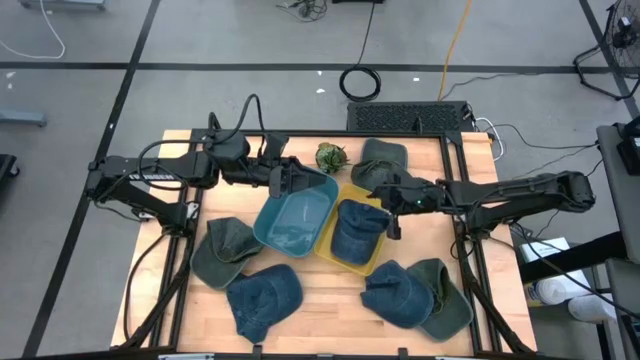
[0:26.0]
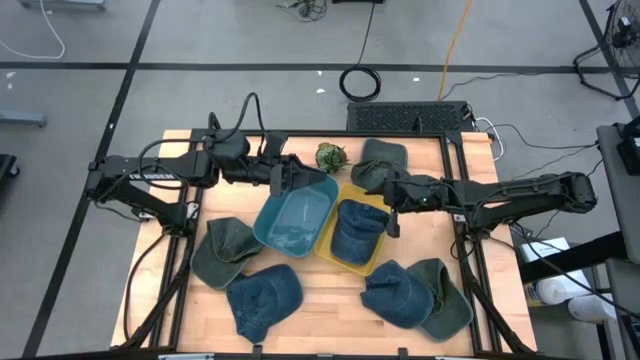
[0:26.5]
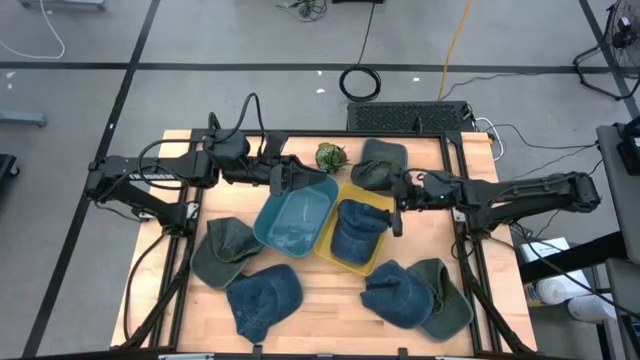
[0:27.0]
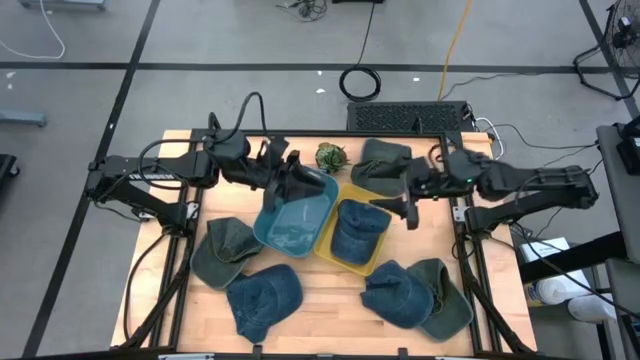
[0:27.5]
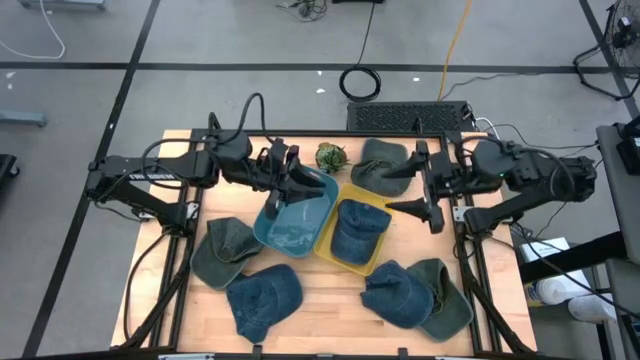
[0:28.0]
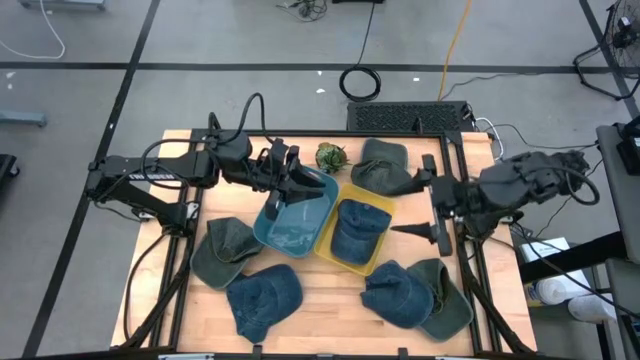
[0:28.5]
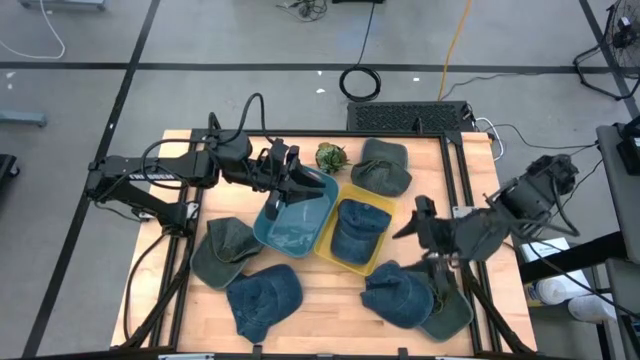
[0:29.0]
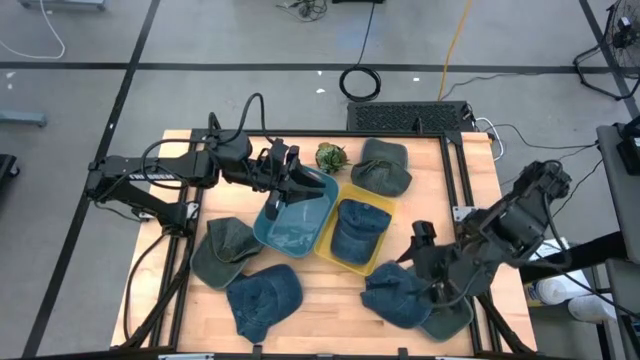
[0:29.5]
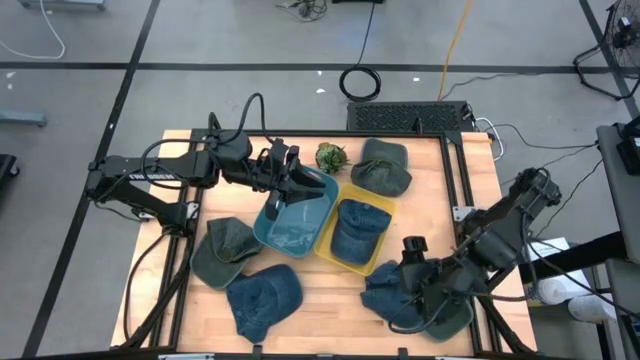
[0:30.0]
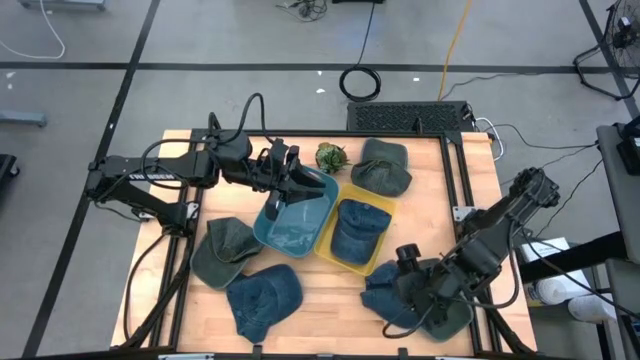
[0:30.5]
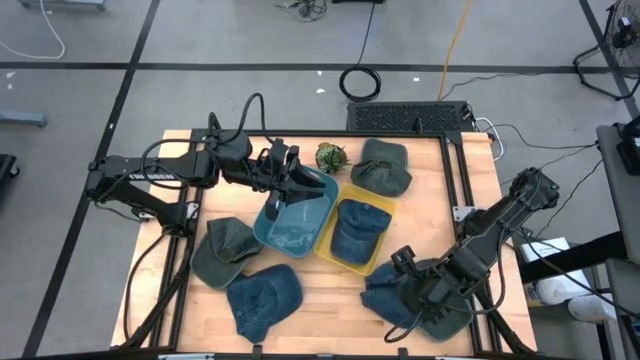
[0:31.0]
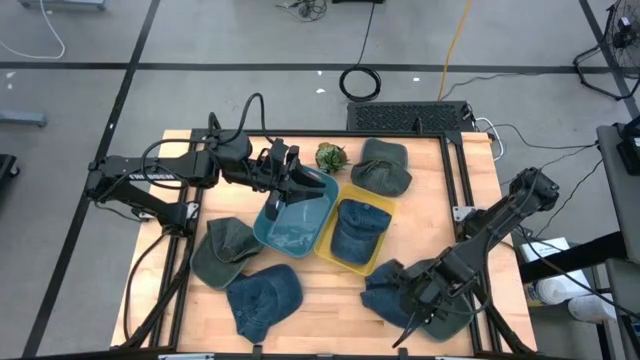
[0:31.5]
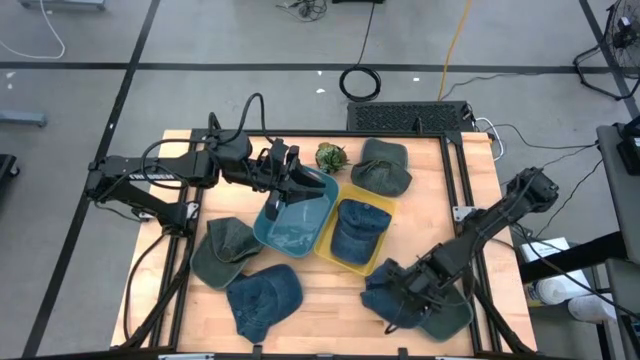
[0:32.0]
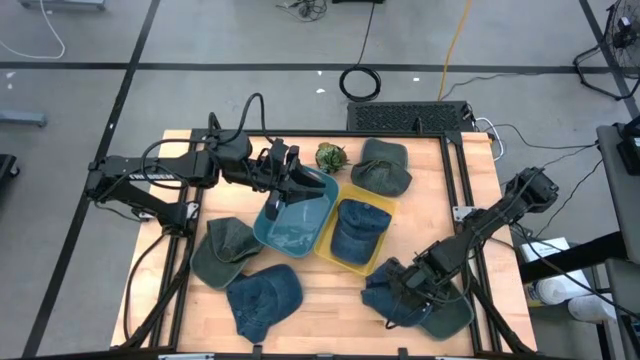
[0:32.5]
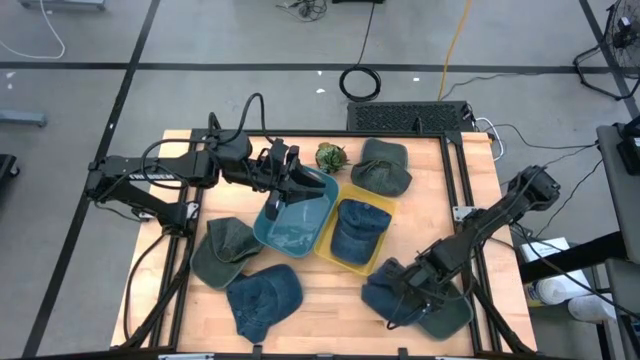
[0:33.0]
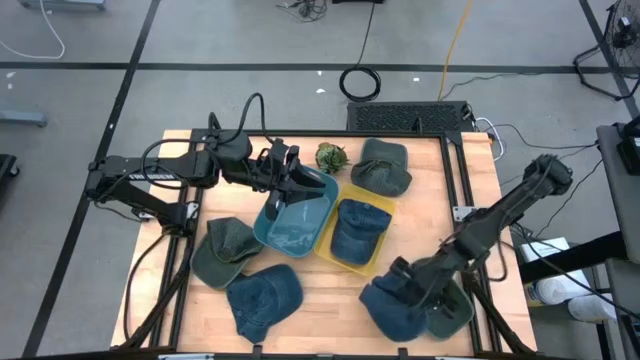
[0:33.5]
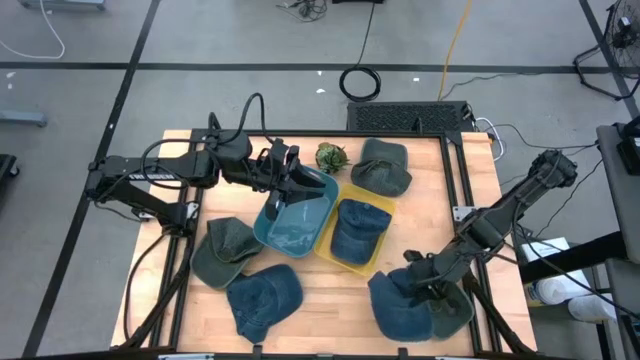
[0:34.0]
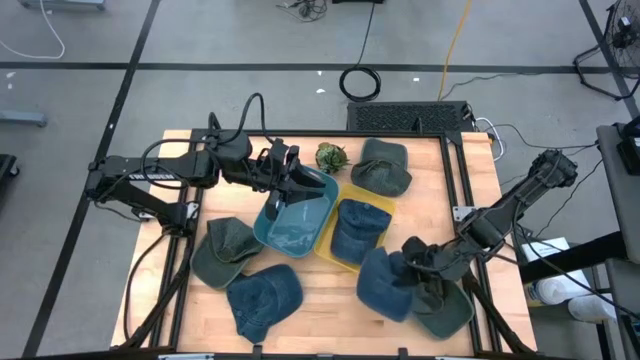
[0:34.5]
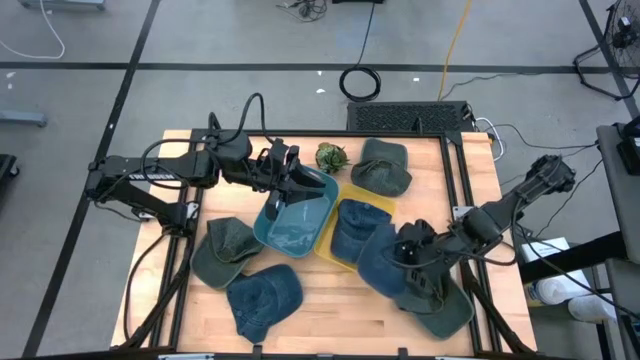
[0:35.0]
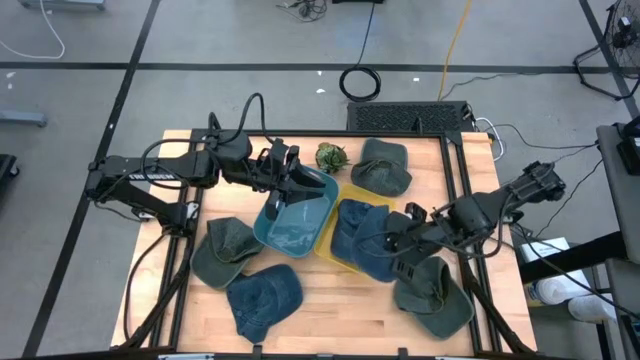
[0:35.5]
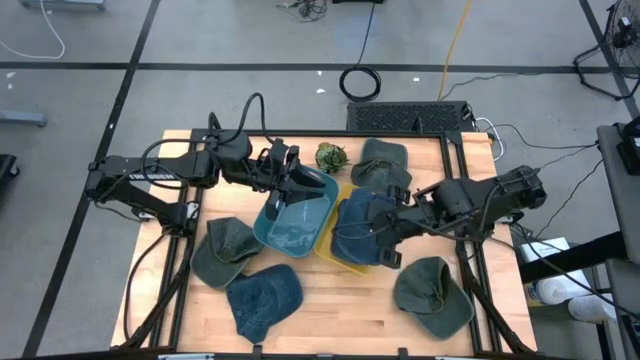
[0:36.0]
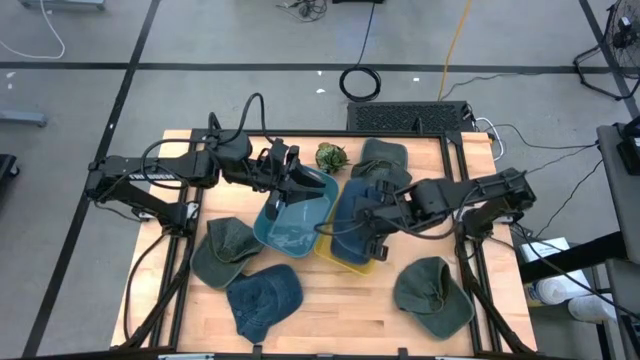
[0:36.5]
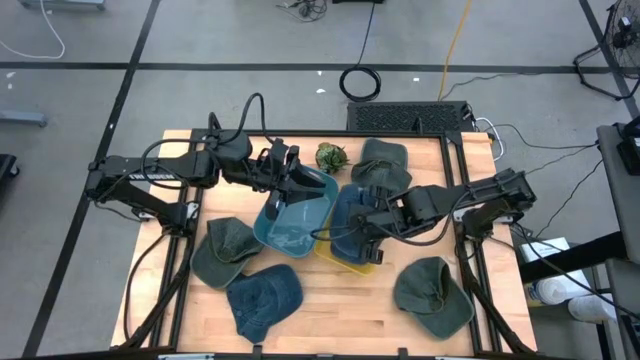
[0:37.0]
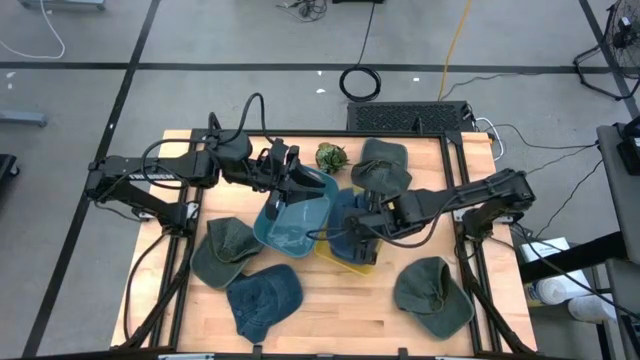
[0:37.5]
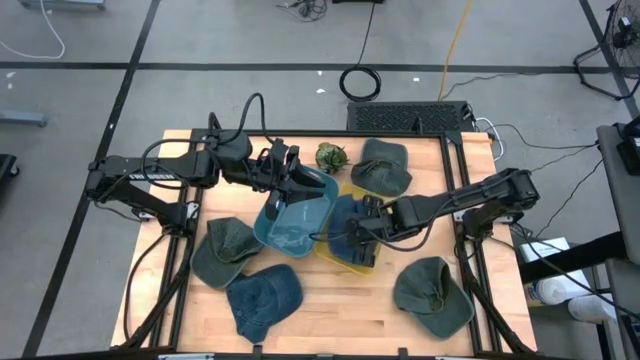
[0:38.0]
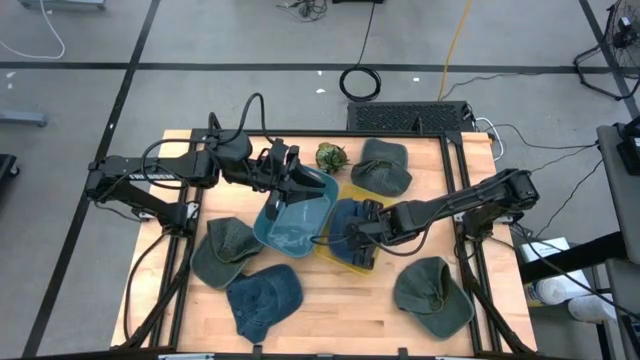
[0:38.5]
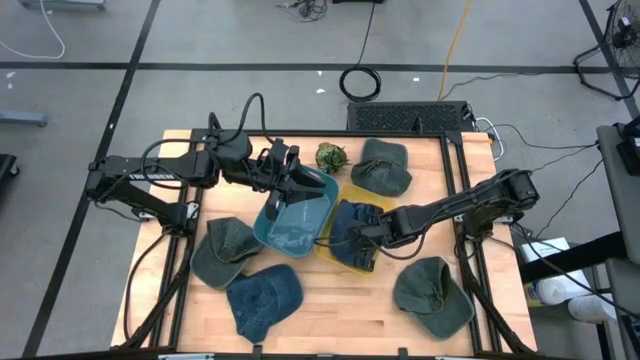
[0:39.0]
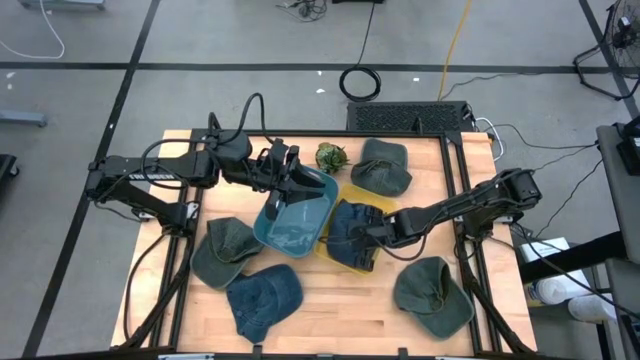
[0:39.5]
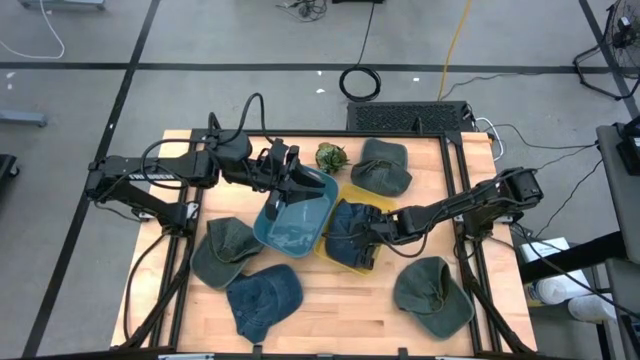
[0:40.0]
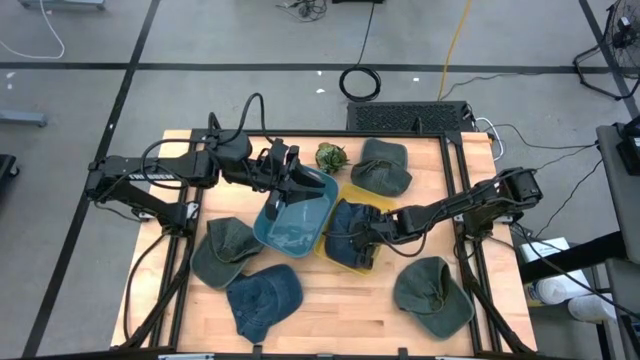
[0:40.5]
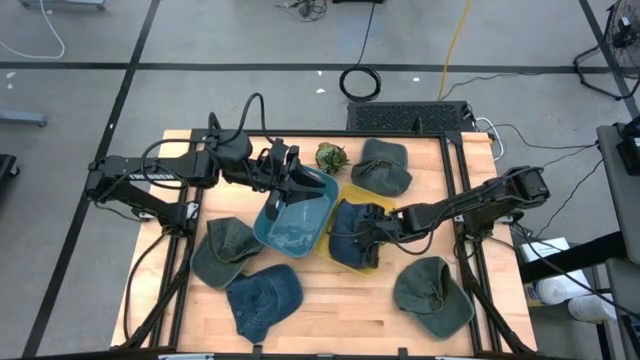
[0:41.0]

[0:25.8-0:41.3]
Task: Pick & Place hat
Put the right blue cap into the yellow bin

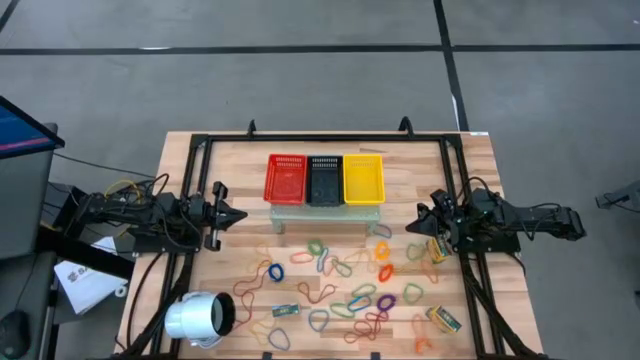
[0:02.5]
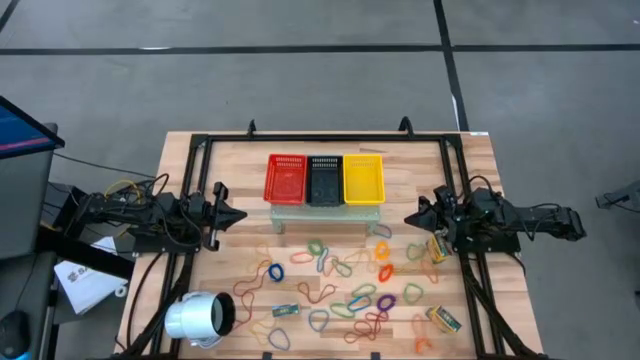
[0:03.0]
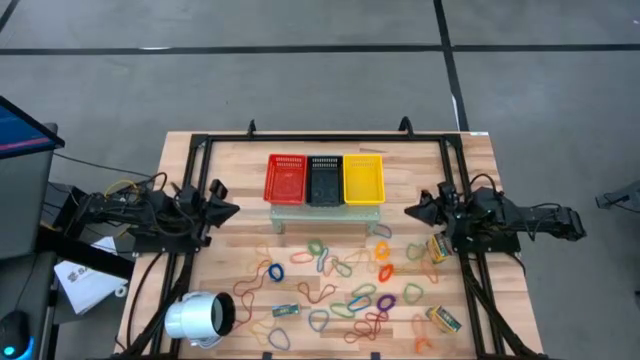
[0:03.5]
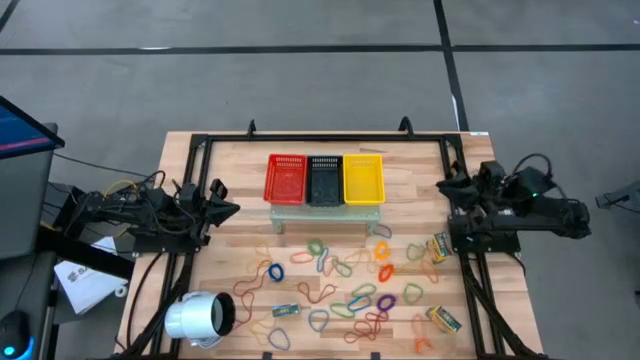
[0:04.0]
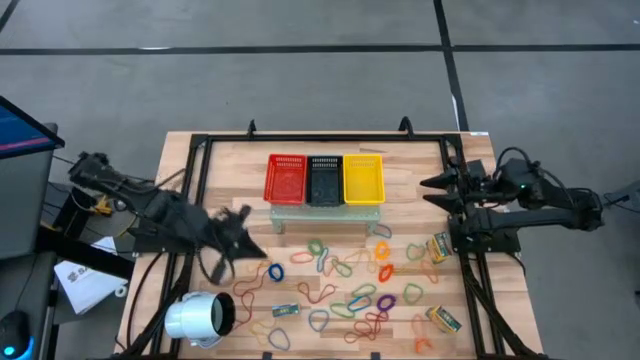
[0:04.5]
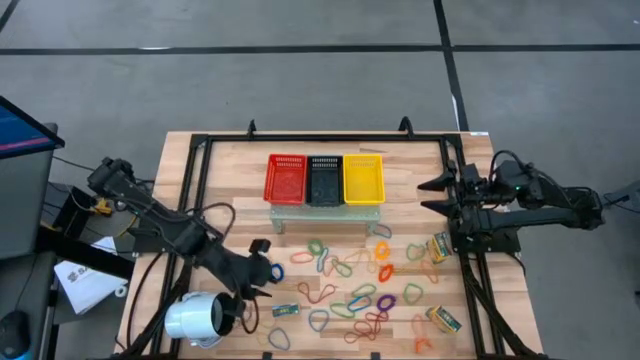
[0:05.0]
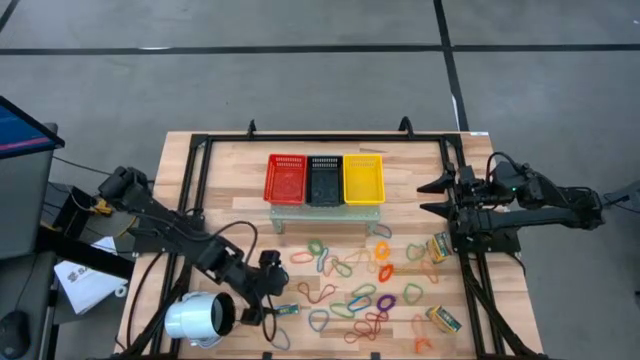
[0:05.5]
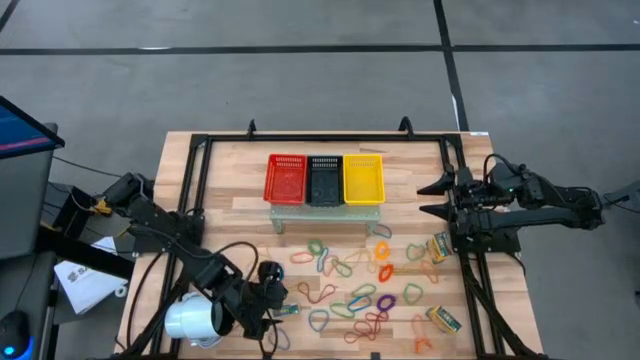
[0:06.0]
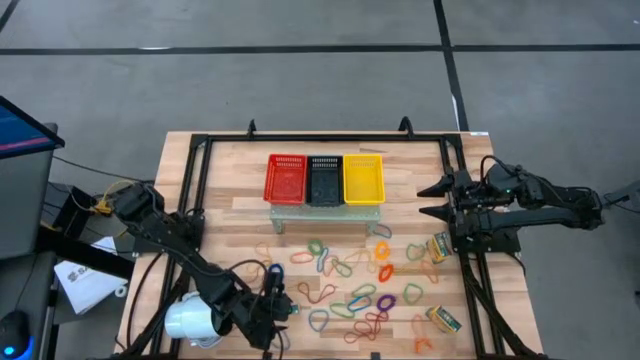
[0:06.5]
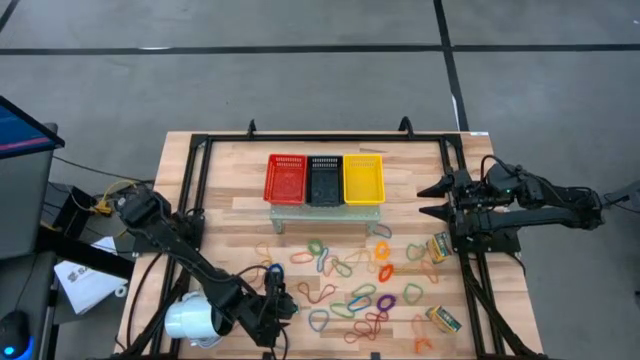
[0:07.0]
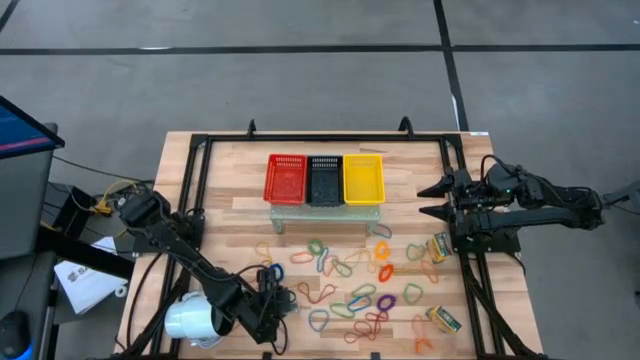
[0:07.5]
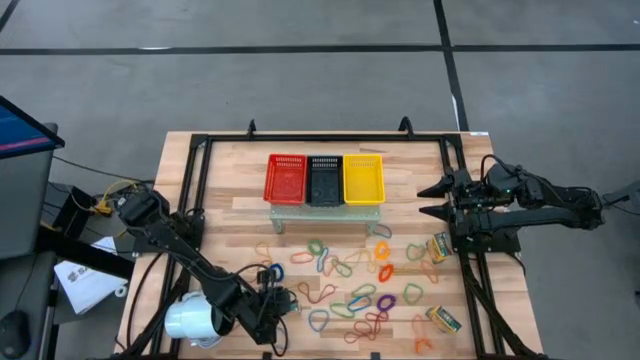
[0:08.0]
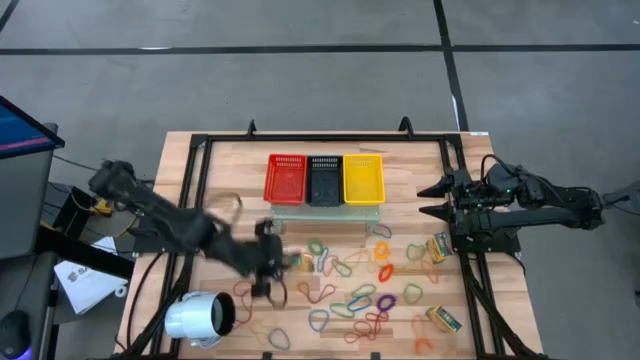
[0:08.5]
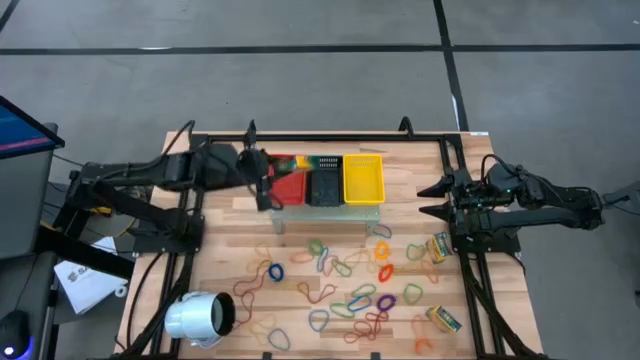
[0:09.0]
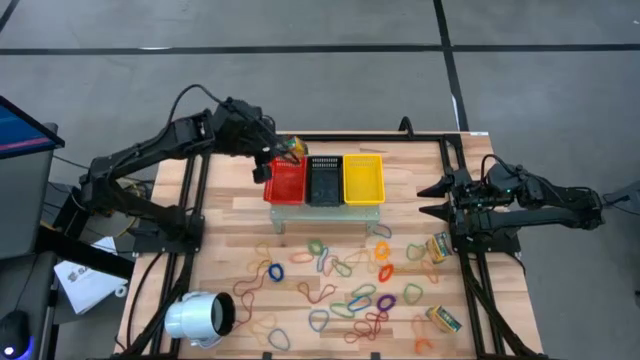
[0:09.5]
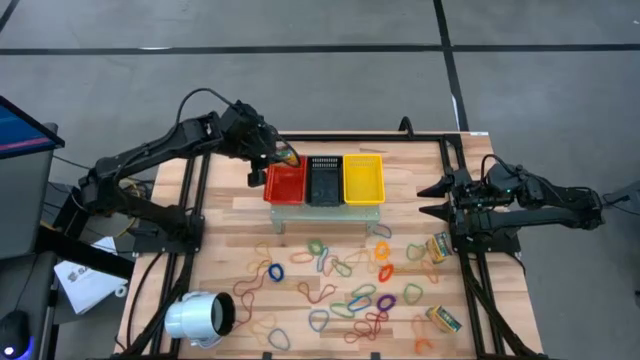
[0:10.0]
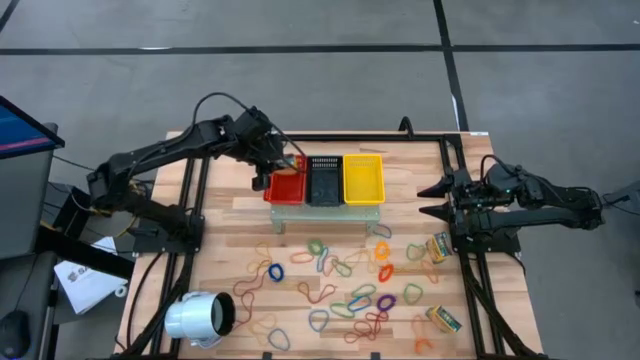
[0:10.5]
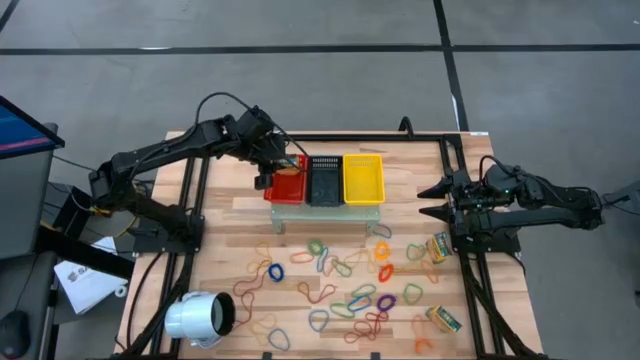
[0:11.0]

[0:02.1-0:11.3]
Task: Pick & Place Office Desk Supplies
Put the crayon box into the red bin on the shelf
